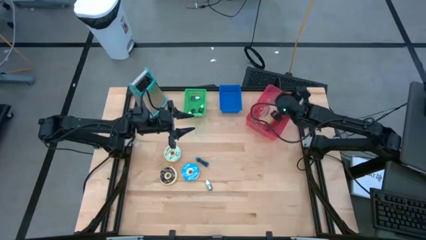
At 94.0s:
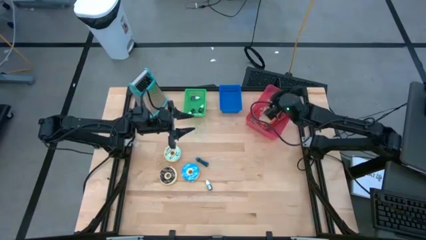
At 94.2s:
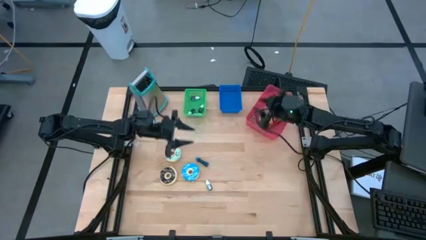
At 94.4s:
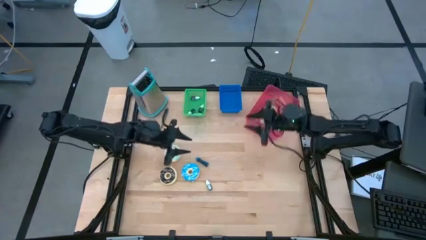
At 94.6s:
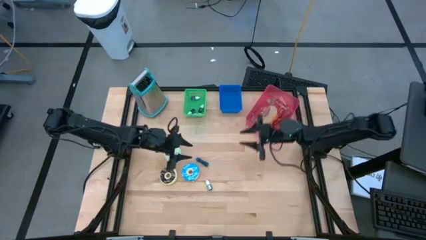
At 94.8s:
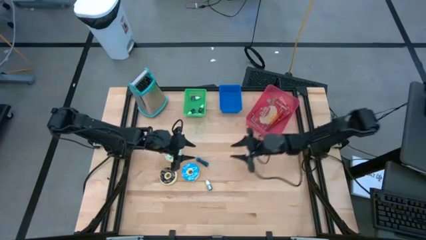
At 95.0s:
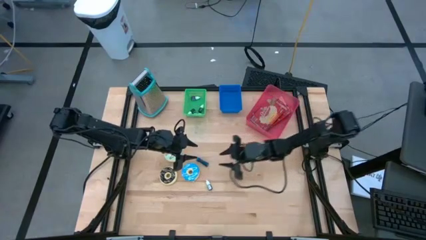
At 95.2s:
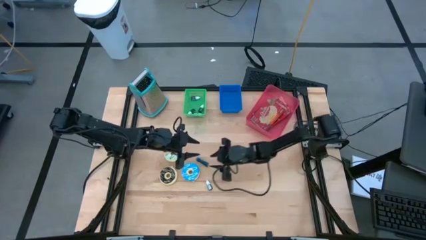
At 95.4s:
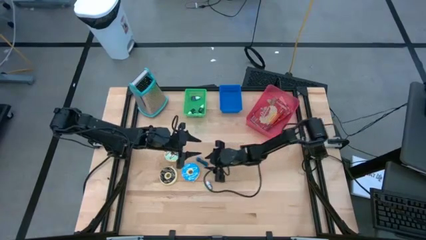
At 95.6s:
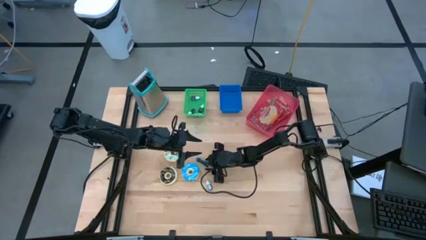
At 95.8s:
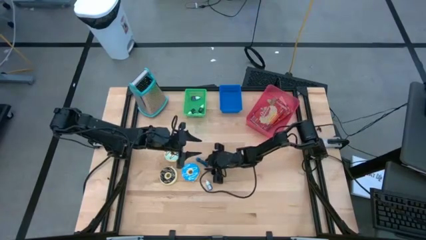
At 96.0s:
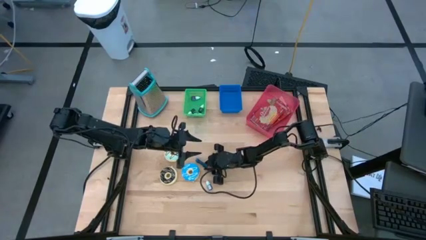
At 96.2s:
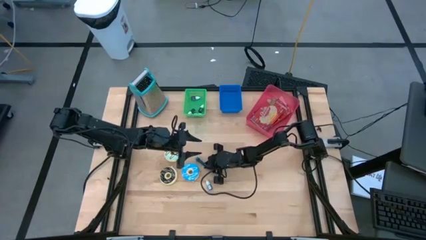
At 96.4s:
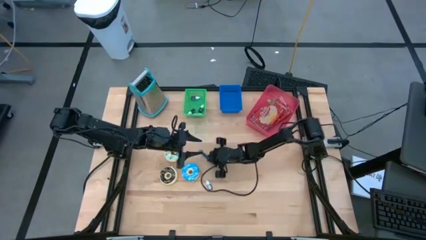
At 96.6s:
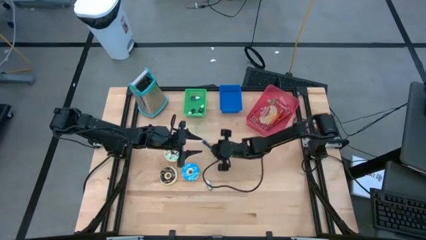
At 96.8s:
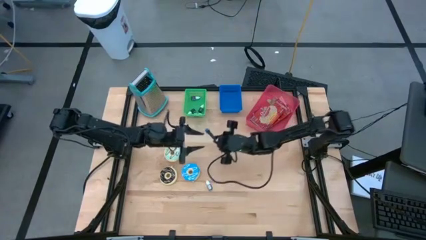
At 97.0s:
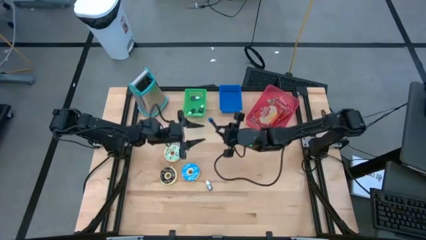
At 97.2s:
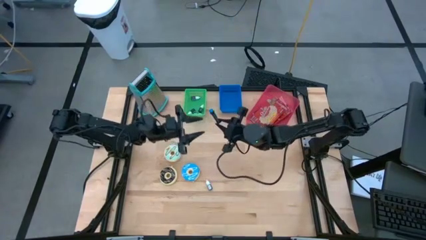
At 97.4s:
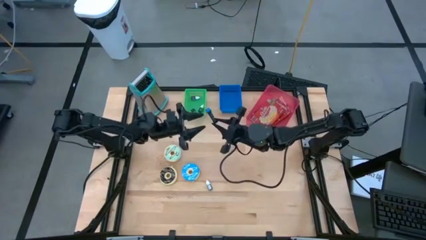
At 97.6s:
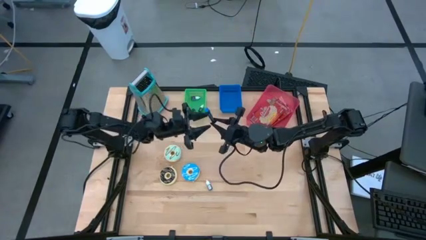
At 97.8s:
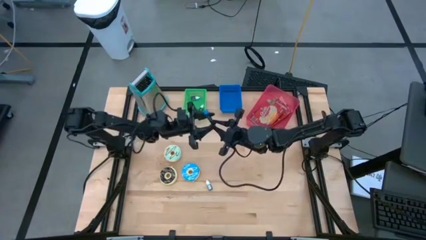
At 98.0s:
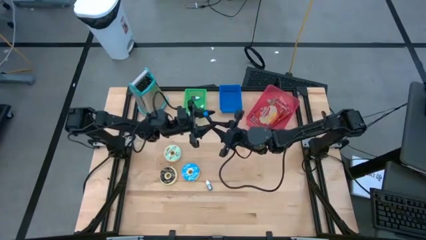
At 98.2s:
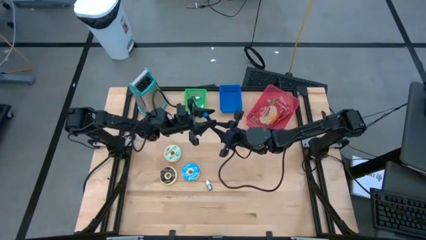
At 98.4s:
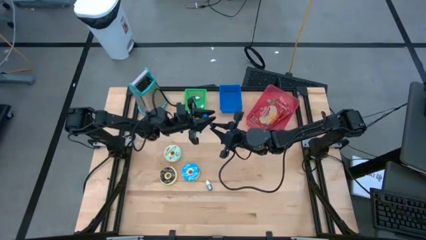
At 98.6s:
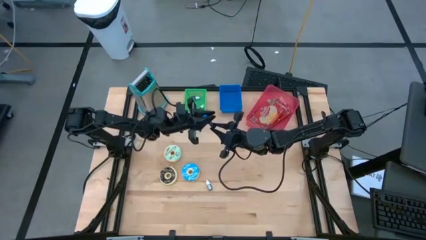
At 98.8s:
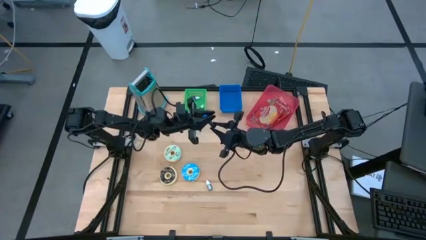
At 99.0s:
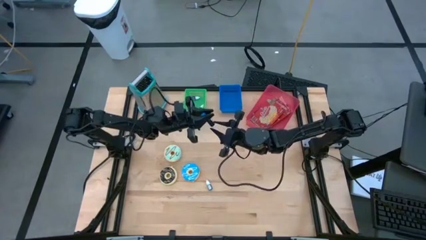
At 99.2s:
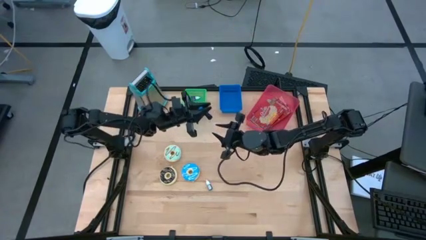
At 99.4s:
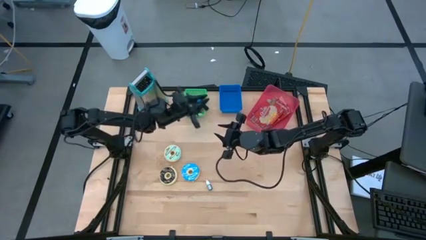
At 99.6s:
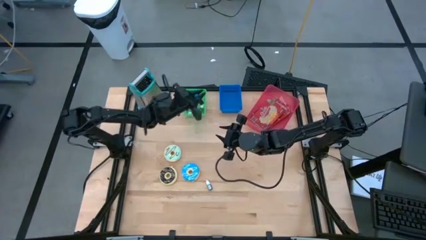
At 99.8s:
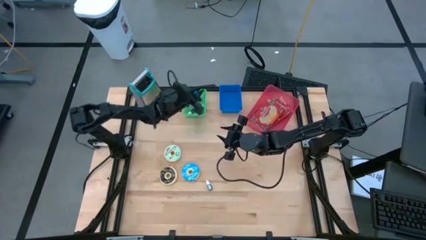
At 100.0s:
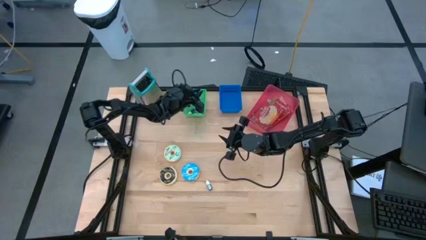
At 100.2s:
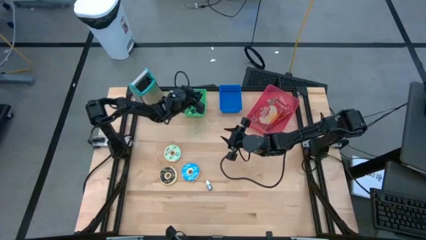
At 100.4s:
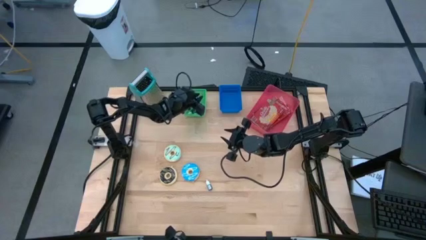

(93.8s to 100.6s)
Put the blue food coloring bottle into the green bin

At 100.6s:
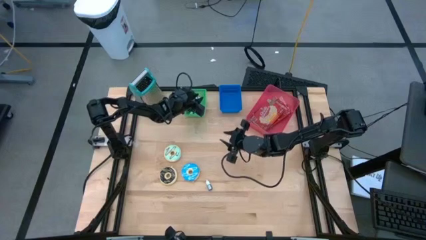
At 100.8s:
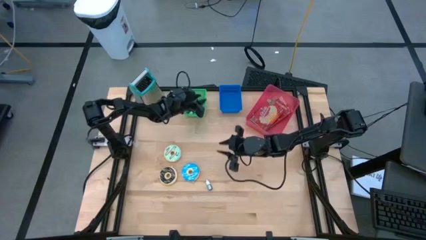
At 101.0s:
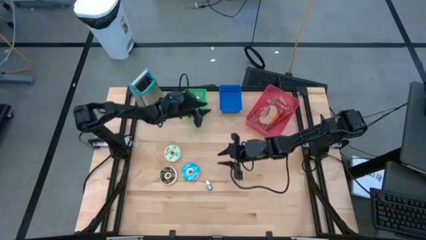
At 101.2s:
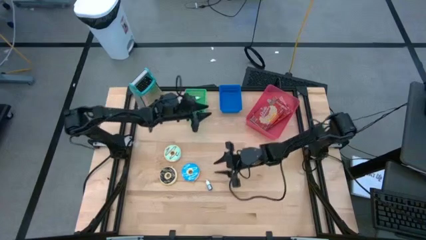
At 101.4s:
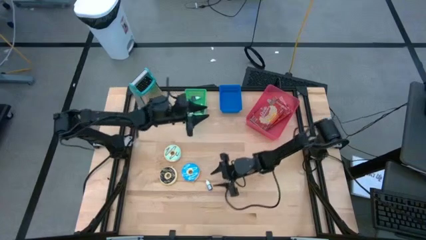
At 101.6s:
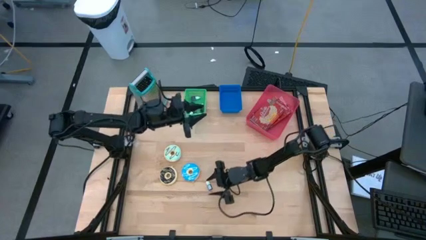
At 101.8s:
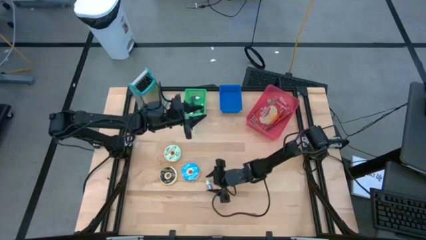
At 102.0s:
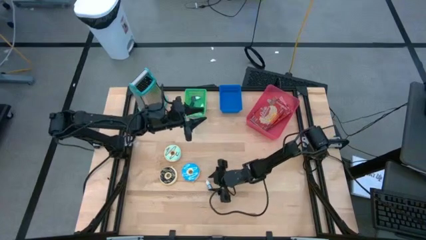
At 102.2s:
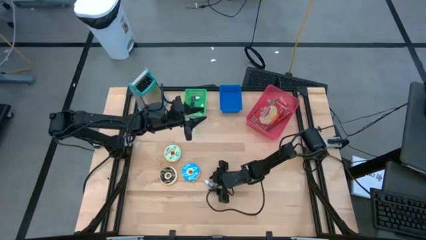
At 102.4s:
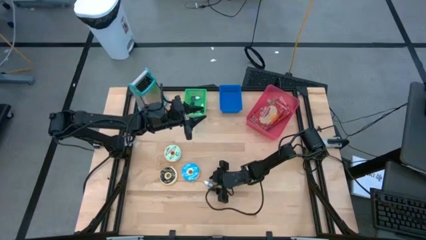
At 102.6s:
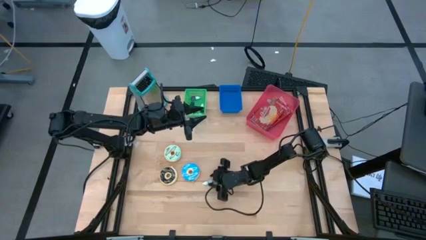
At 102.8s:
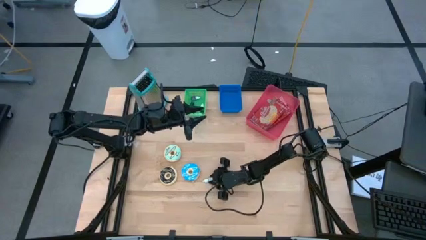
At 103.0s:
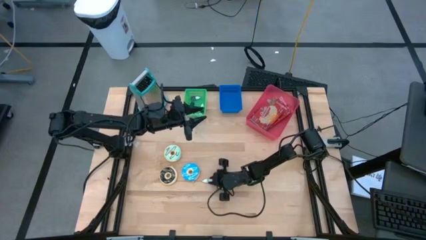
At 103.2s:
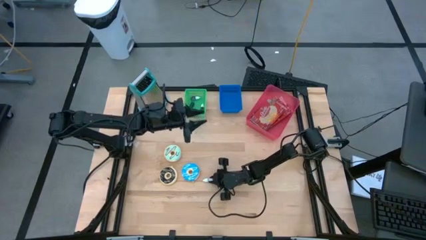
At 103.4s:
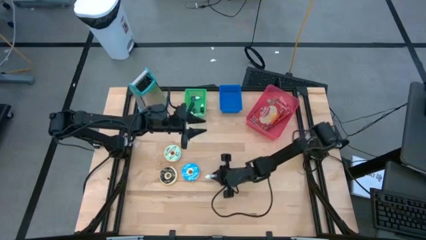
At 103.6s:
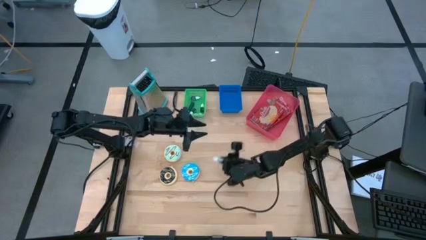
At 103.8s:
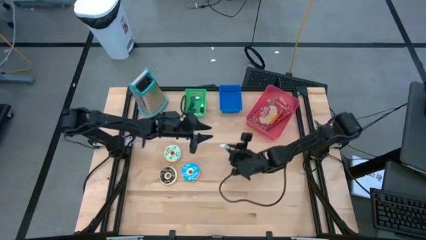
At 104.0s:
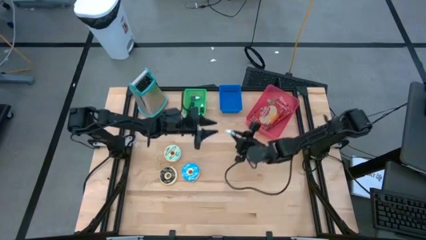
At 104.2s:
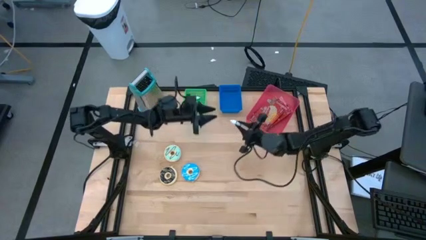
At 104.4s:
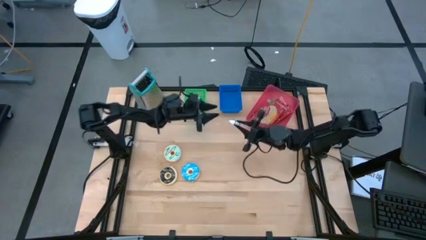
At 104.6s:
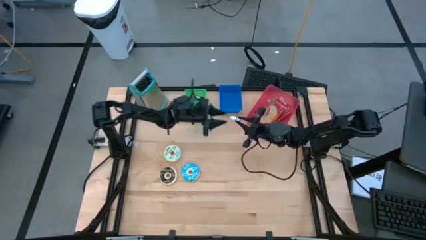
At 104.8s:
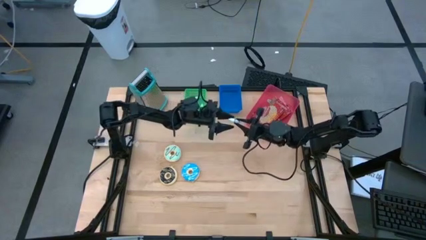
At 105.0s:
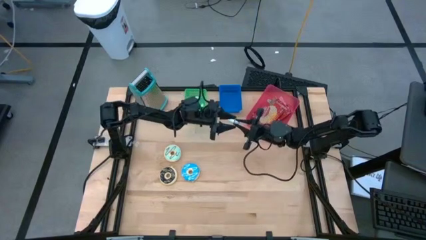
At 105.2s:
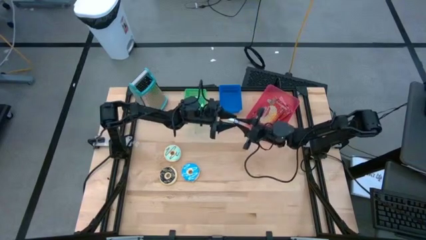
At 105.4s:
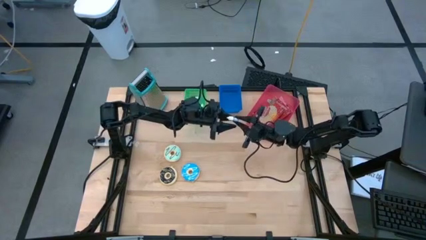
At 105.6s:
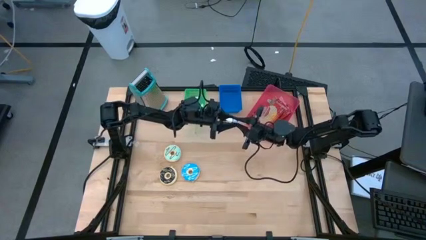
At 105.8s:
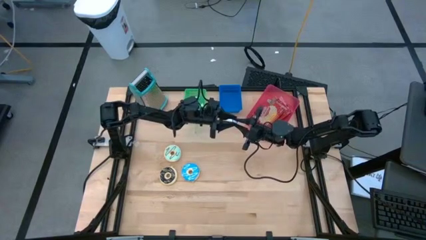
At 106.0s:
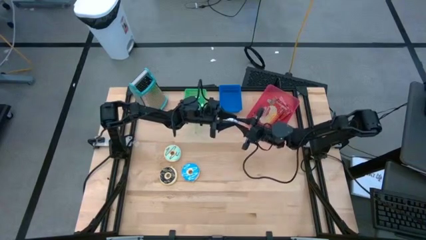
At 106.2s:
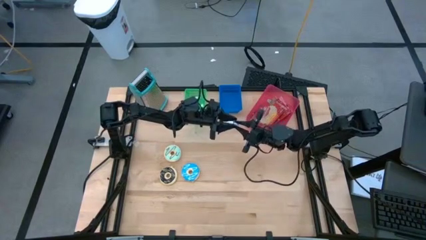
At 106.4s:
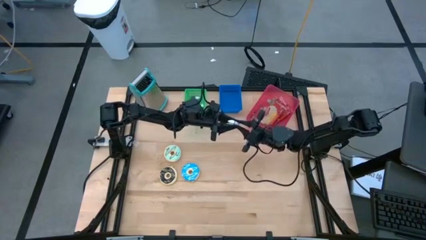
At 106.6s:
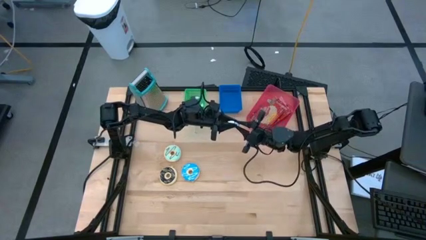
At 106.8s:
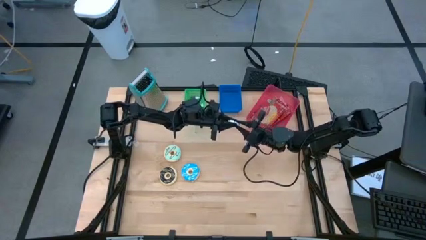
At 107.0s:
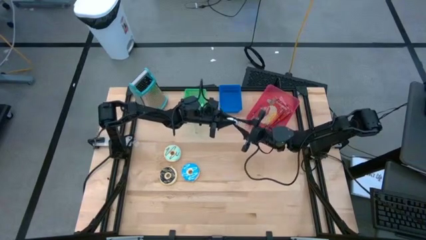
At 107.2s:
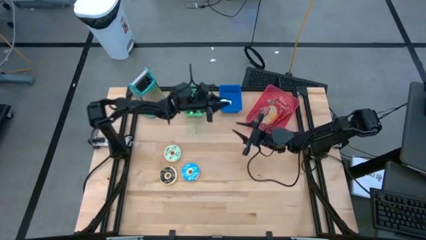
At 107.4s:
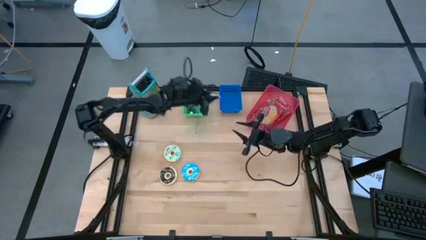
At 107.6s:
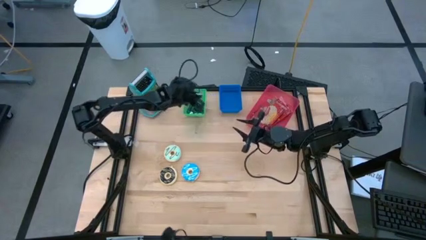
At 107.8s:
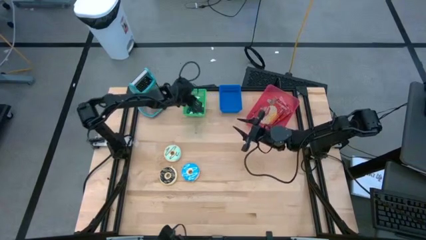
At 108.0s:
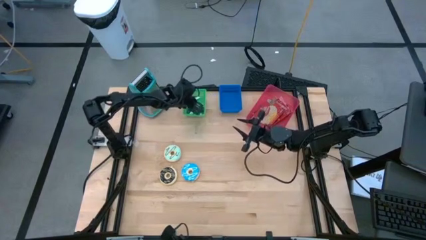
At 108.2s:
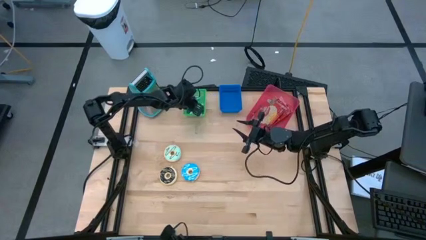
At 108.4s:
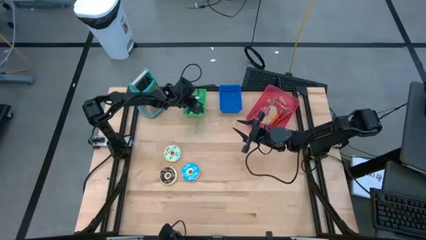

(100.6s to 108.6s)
Put the black food coloring bottle into the green bin
